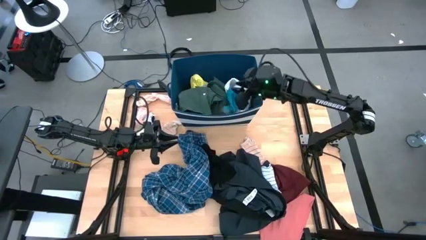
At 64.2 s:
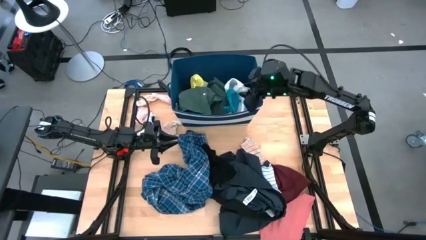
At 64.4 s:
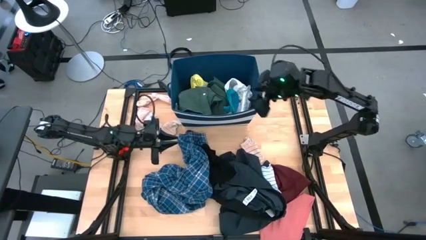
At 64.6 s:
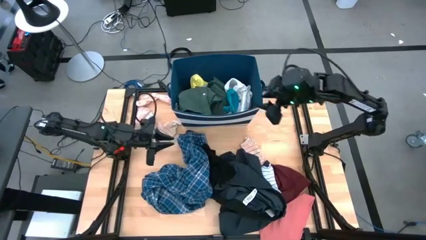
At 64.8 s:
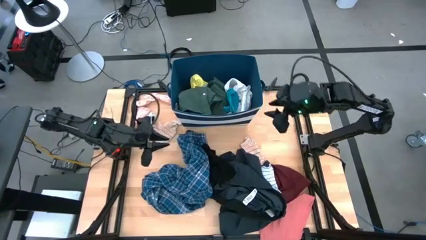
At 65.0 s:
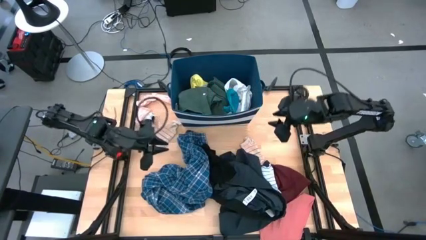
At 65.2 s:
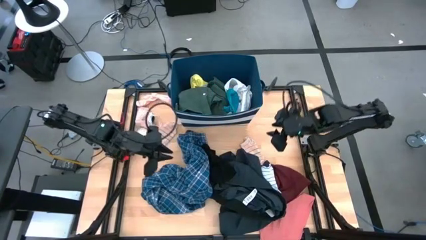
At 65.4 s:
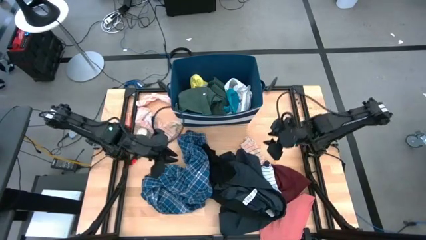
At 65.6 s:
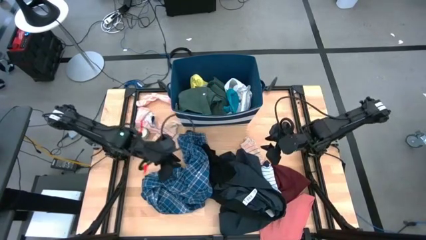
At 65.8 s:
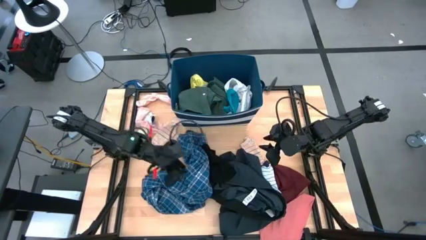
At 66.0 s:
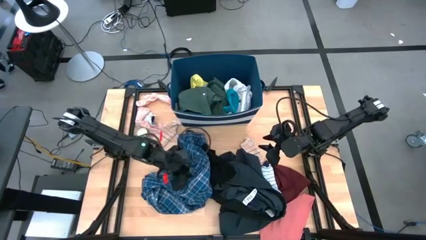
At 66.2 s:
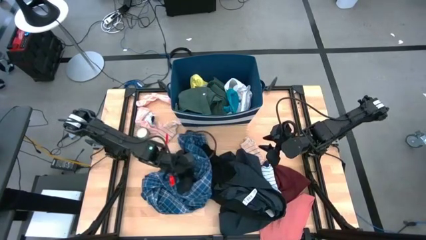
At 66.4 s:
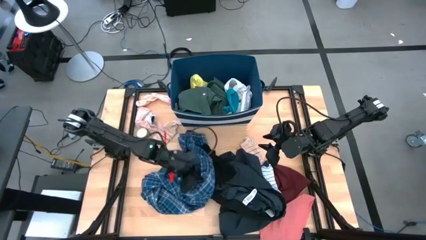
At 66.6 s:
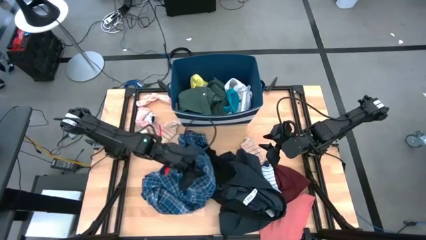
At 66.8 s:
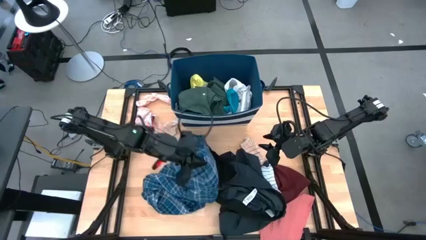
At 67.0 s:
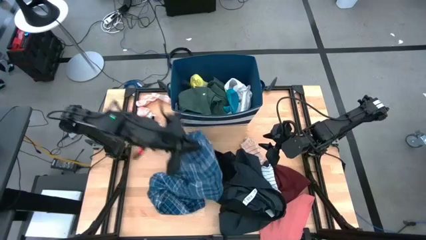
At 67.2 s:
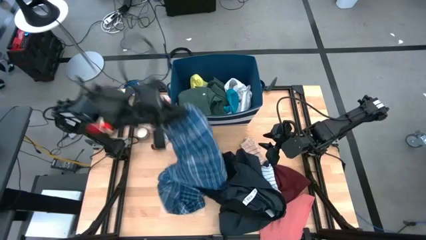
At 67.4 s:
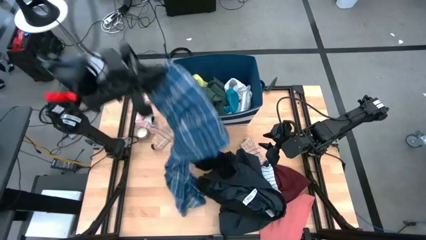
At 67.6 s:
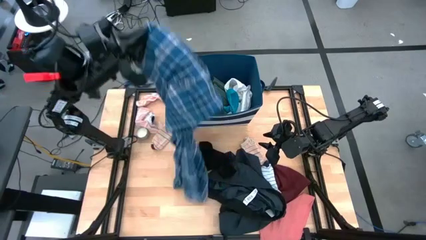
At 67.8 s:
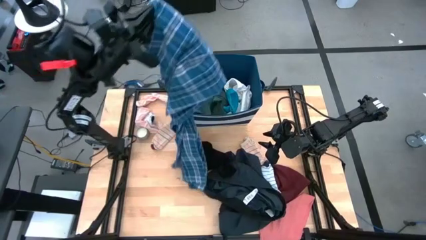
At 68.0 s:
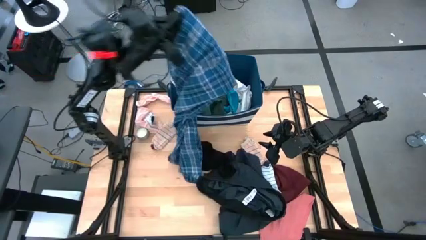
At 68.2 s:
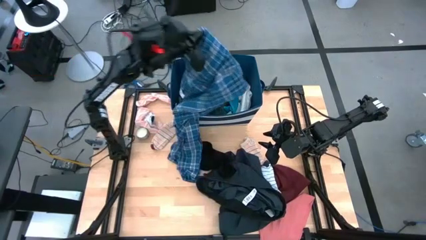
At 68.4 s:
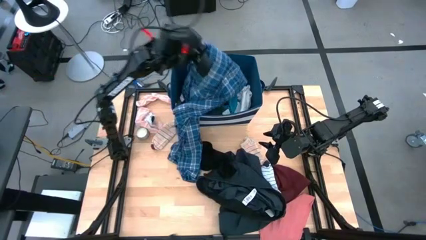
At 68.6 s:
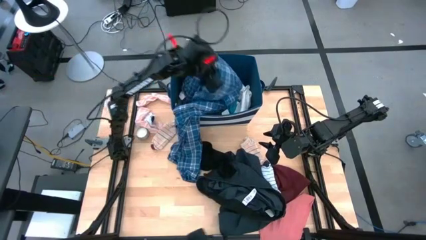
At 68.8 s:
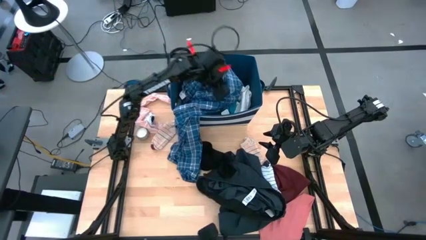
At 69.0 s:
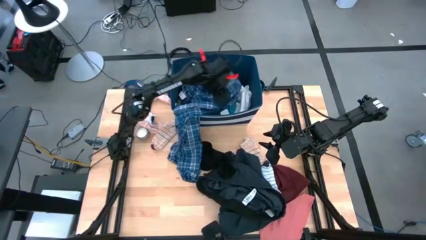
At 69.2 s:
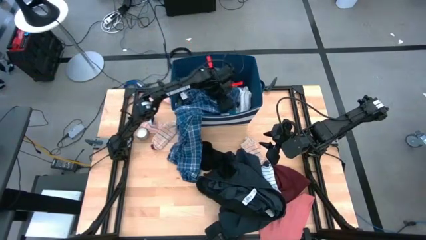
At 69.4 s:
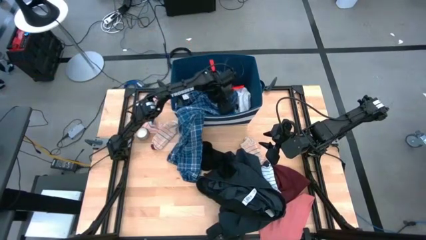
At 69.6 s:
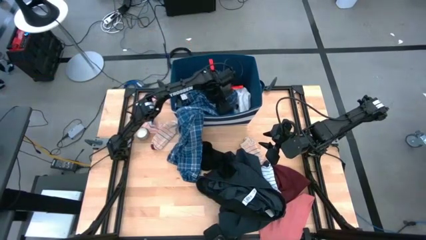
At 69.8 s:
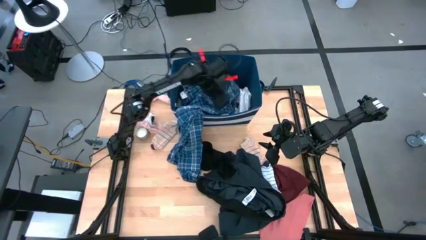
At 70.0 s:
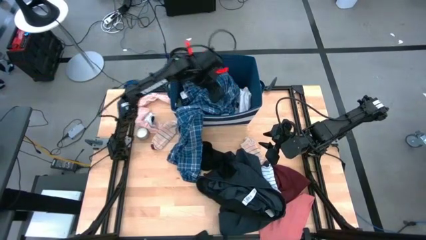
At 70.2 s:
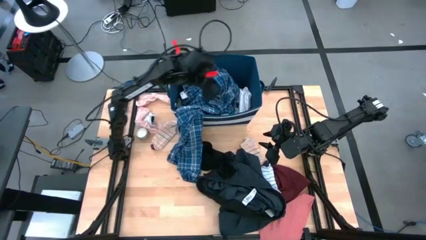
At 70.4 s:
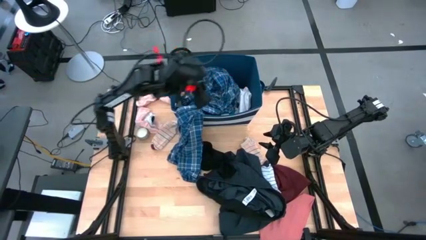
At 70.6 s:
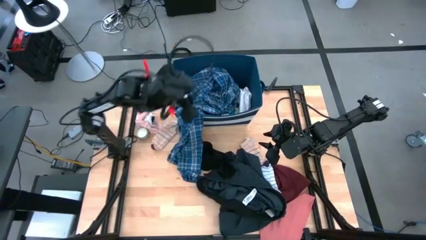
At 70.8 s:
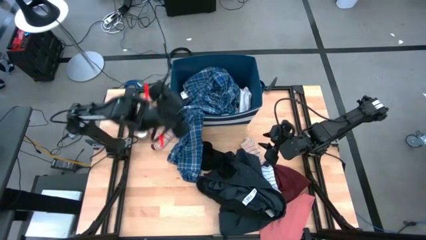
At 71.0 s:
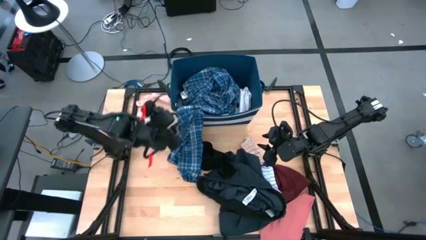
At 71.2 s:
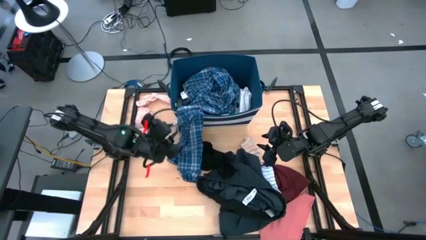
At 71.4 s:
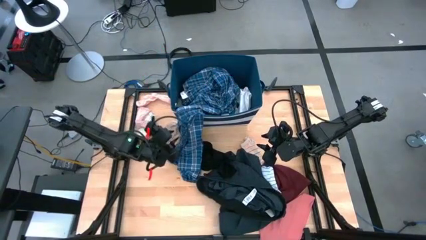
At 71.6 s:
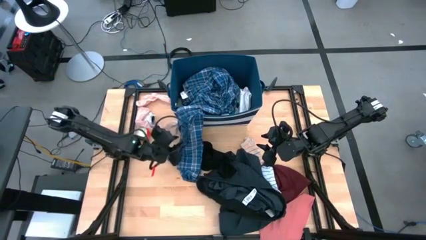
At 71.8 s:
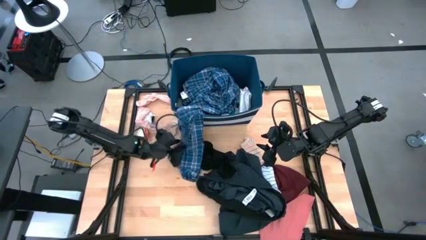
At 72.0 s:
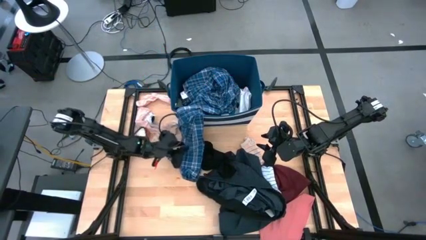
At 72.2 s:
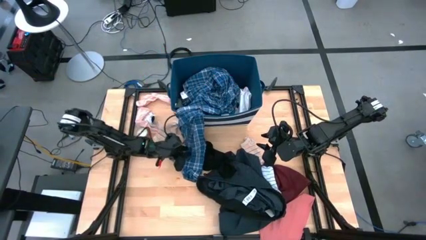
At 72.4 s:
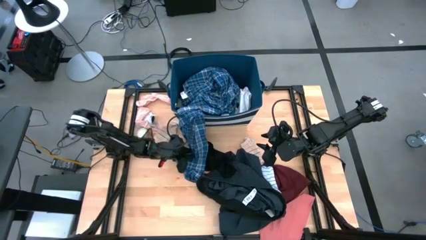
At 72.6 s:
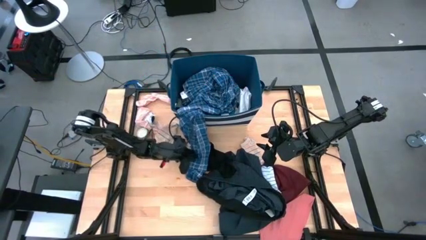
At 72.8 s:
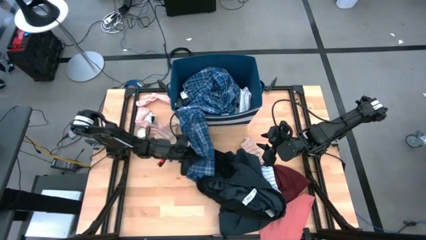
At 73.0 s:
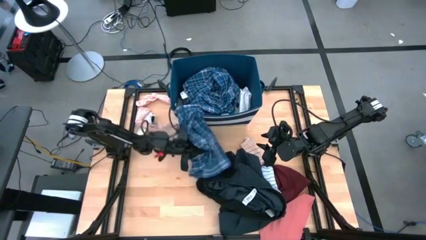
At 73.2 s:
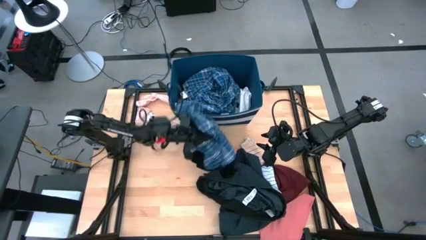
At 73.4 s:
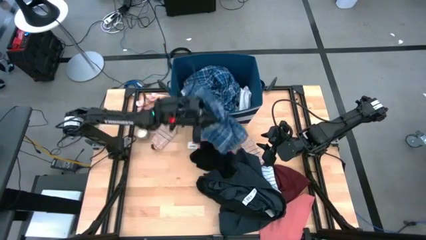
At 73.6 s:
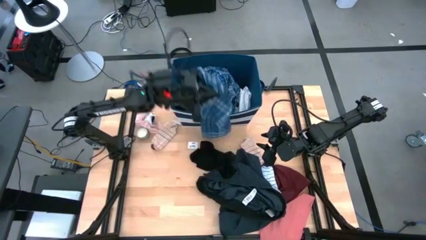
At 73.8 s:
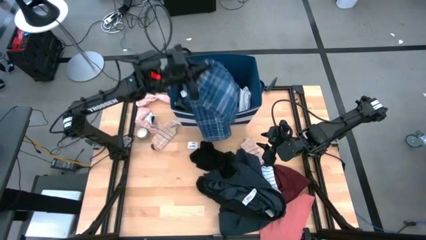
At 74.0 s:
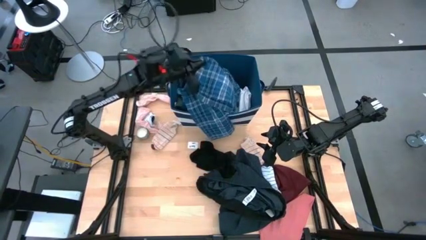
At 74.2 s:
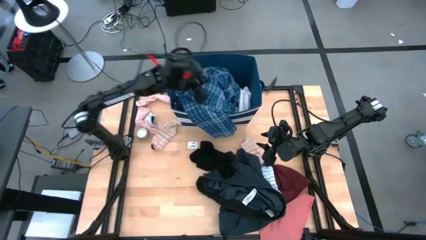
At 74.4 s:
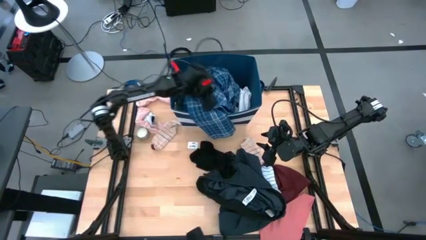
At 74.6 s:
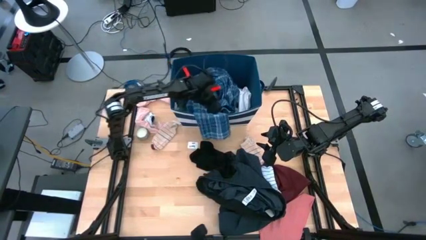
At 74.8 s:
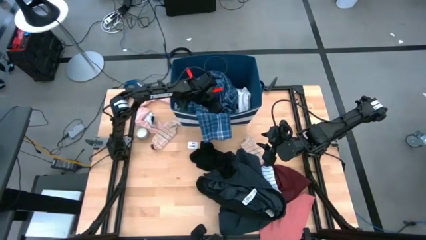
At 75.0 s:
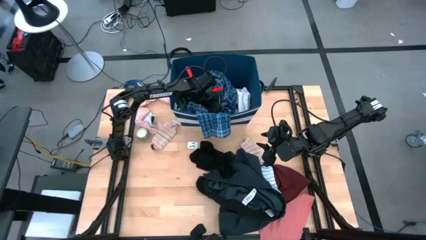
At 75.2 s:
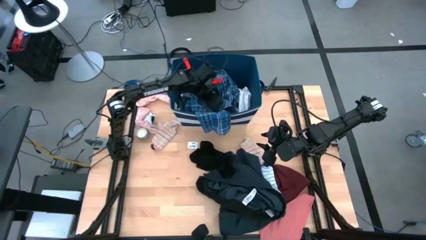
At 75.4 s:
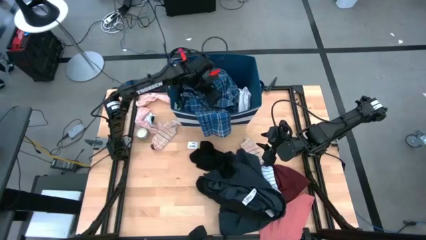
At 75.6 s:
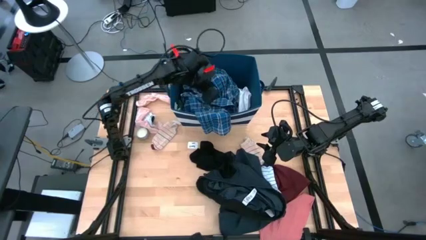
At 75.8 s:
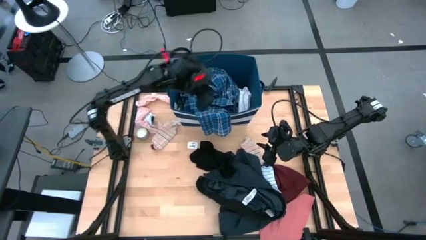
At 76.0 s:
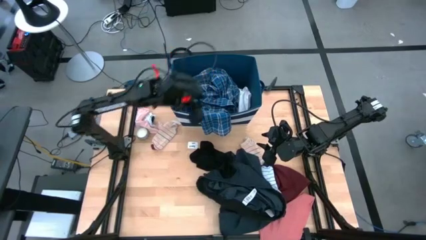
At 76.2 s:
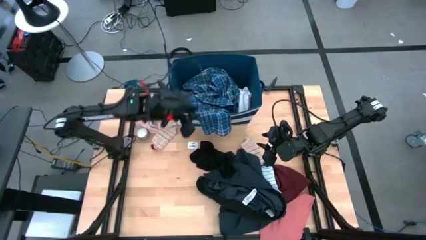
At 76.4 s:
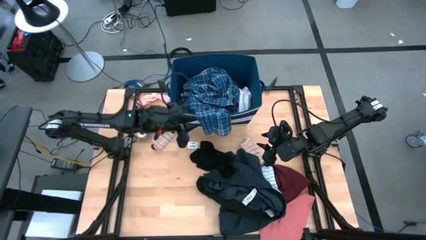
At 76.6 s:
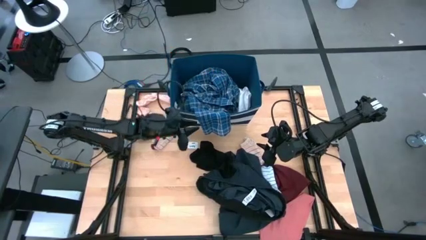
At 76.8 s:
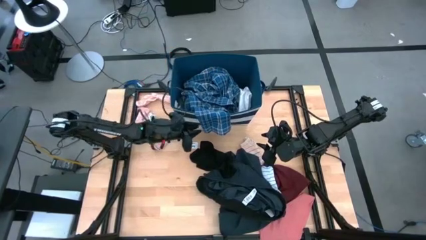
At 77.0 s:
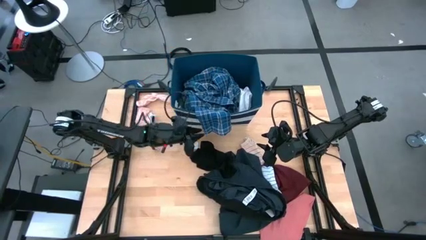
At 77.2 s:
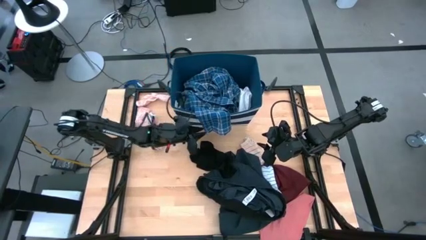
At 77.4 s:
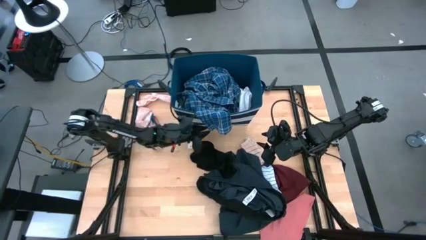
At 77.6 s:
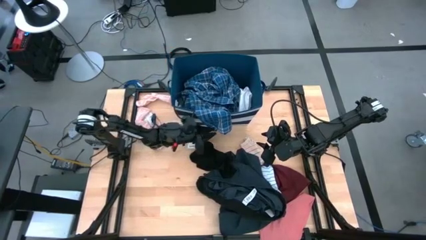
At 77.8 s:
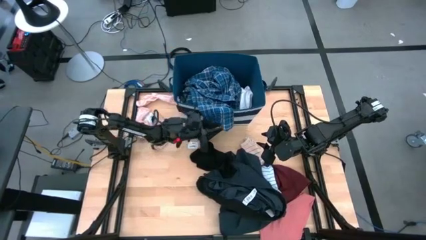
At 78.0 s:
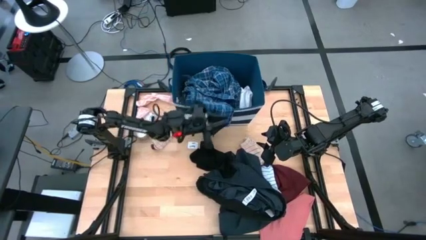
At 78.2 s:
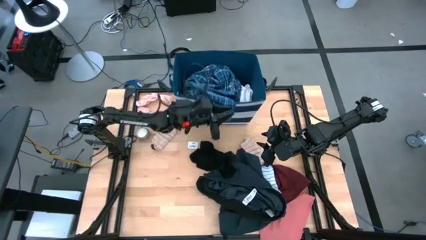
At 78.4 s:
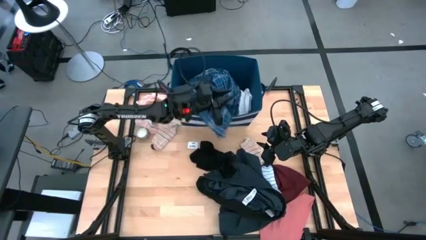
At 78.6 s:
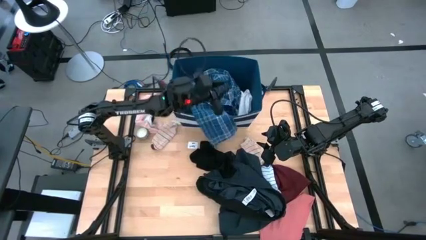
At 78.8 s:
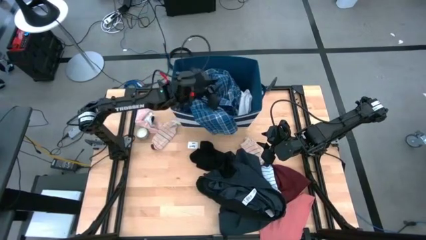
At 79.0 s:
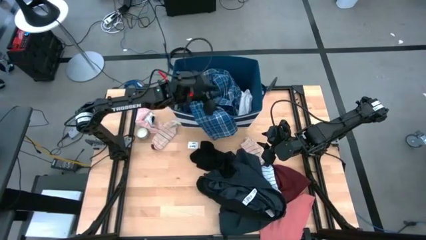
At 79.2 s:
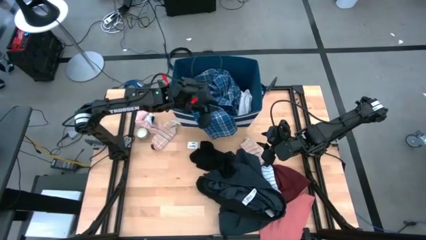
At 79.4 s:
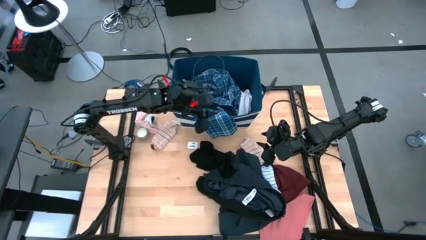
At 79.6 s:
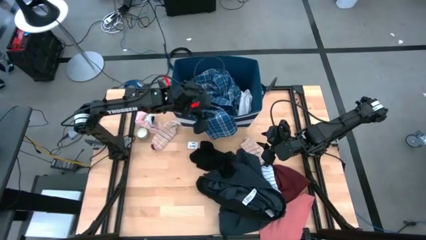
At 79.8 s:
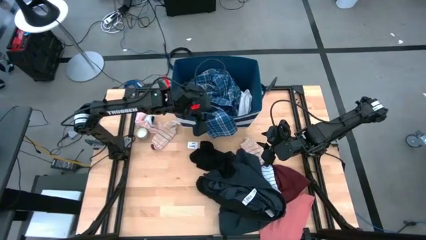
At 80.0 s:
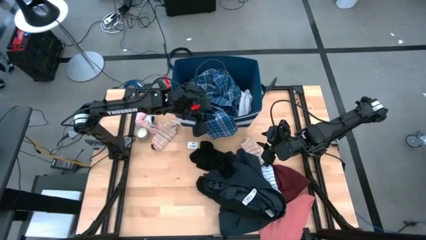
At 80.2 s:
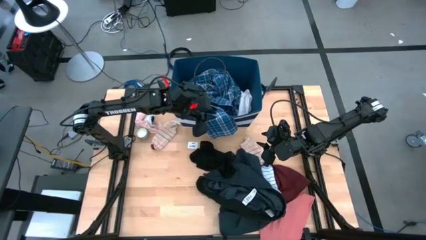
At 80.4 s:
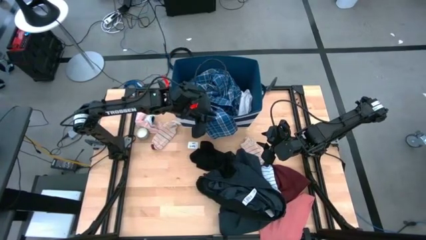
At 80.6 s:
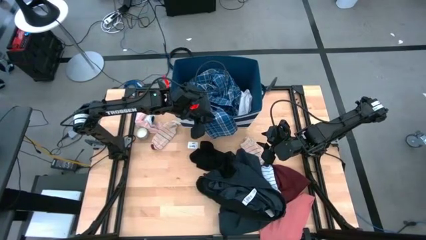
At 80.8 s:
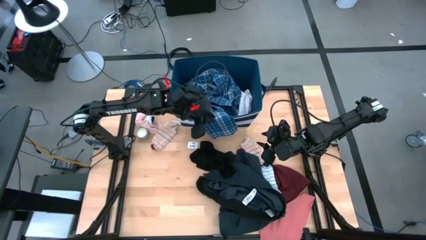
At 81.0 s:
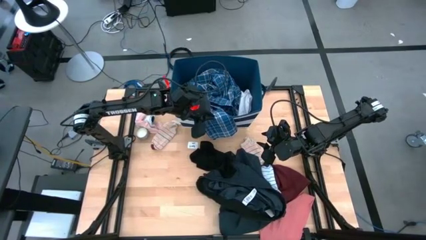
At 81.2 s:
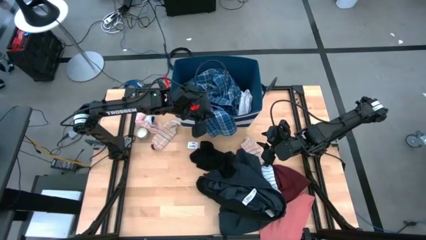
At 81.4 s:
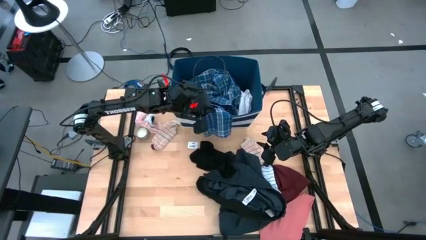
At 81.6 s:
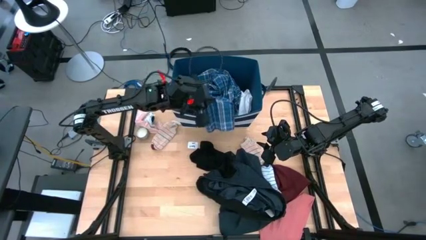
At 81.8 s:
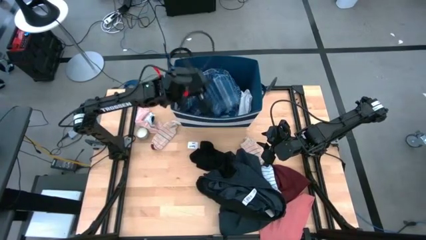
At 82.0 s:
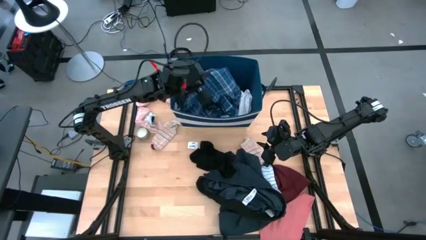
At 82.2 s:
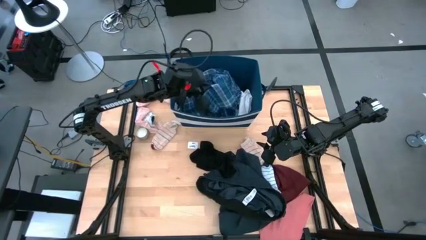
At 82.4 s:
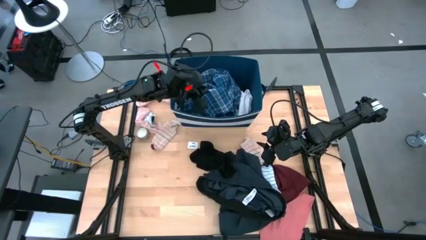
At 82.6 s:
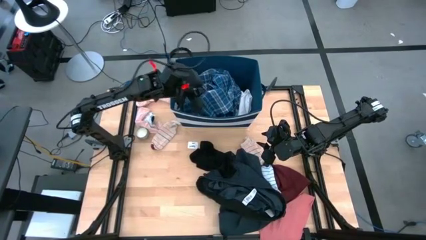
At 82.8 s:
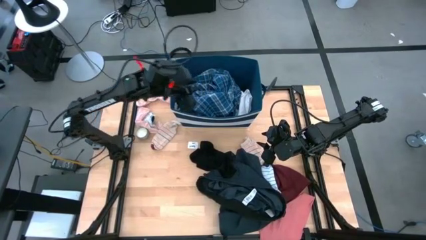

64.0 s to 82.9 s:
Task: Sort clothes
Put the blue pants into the laundry organizer
